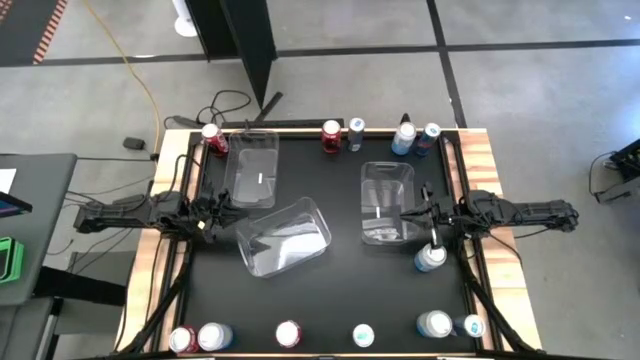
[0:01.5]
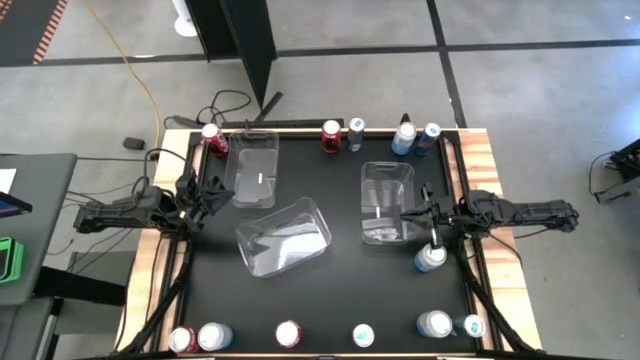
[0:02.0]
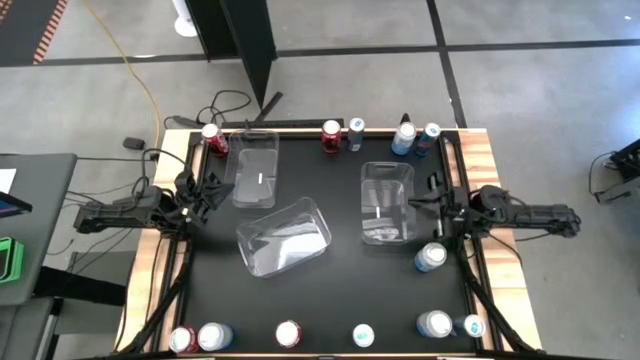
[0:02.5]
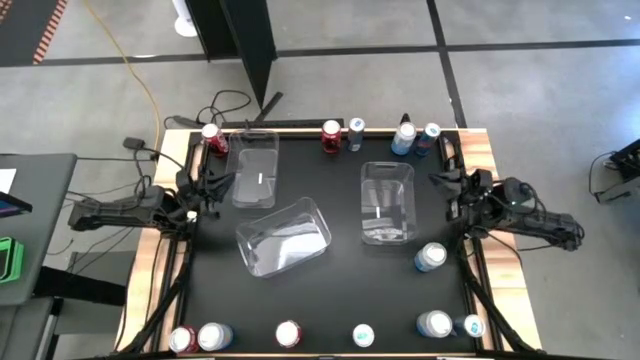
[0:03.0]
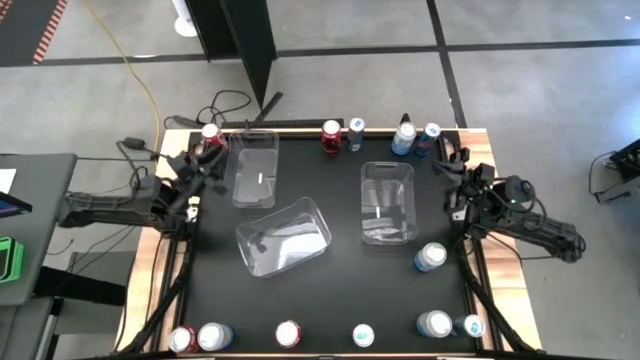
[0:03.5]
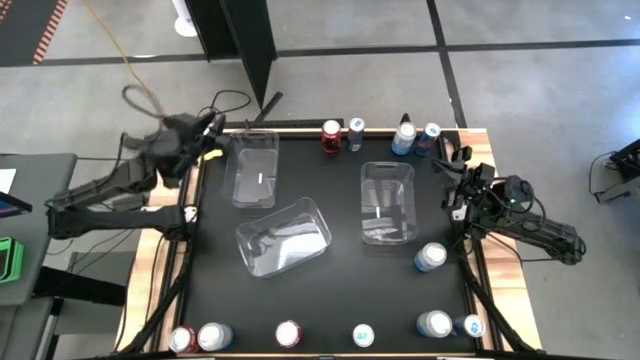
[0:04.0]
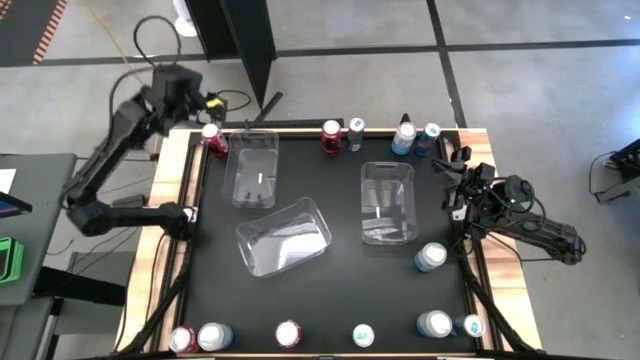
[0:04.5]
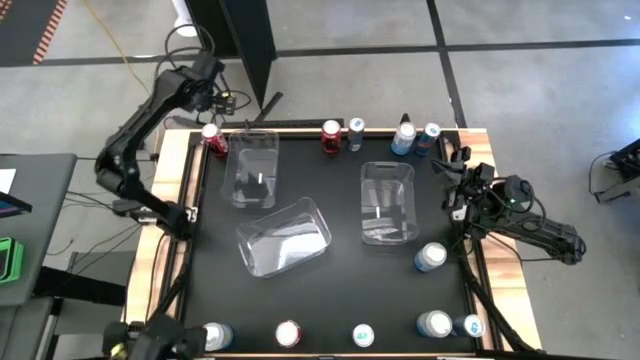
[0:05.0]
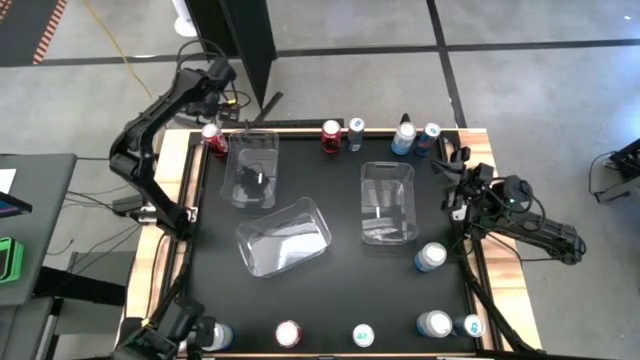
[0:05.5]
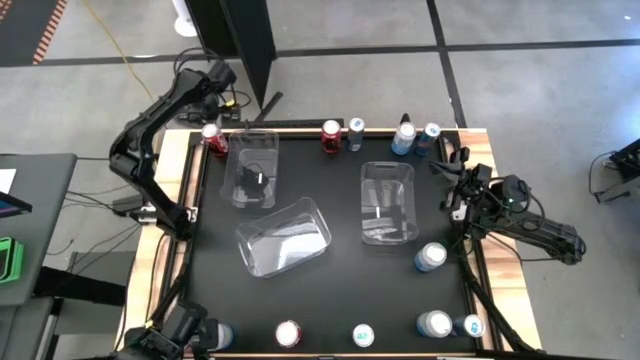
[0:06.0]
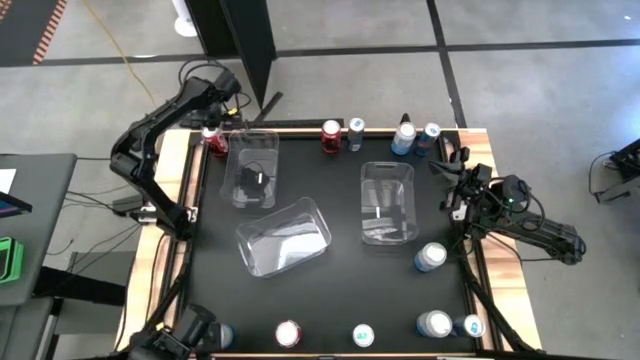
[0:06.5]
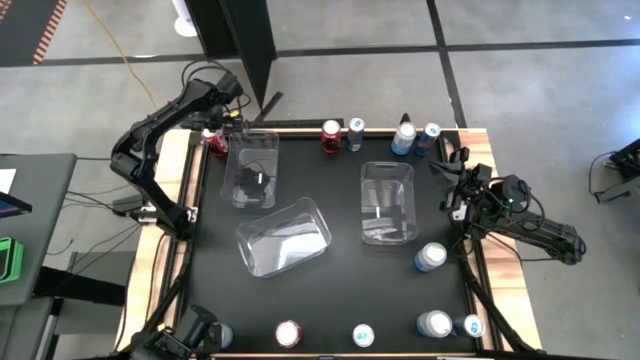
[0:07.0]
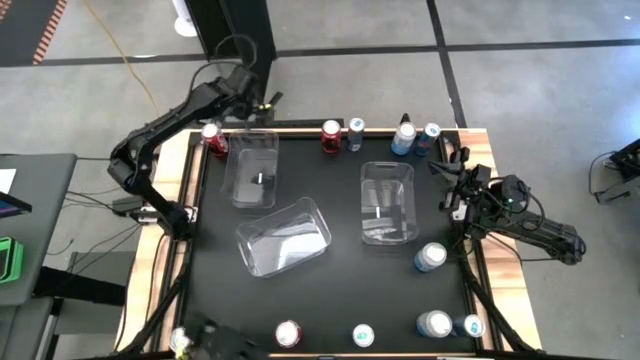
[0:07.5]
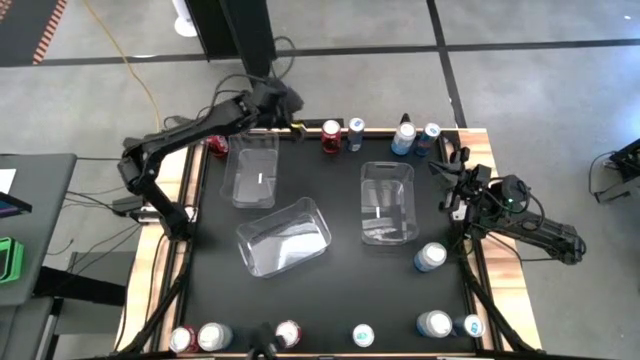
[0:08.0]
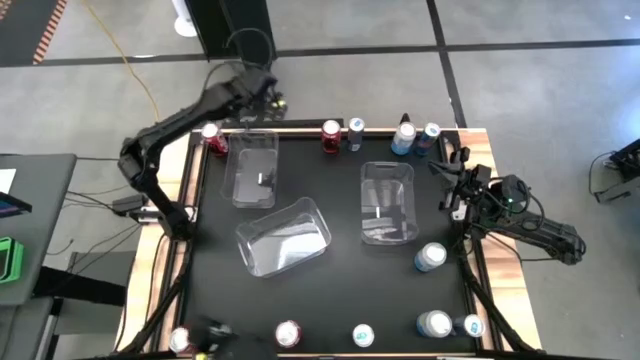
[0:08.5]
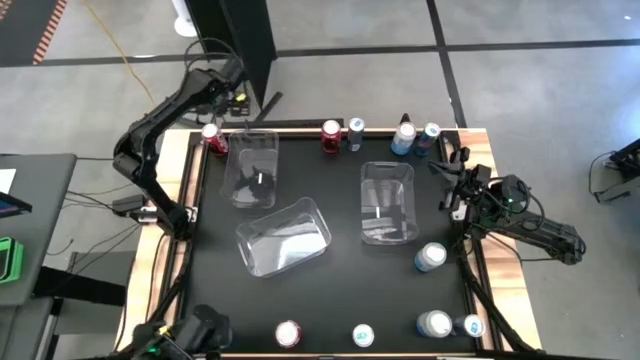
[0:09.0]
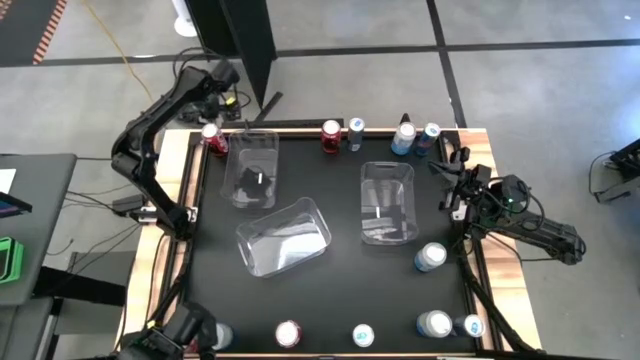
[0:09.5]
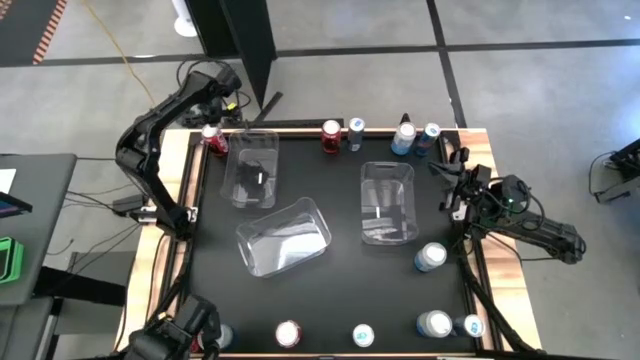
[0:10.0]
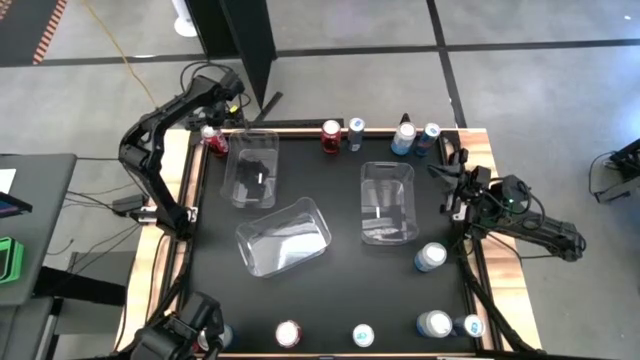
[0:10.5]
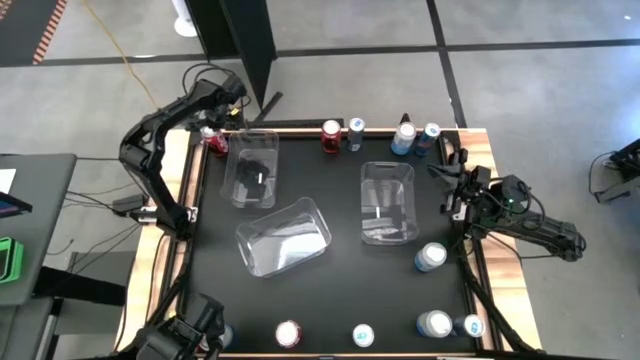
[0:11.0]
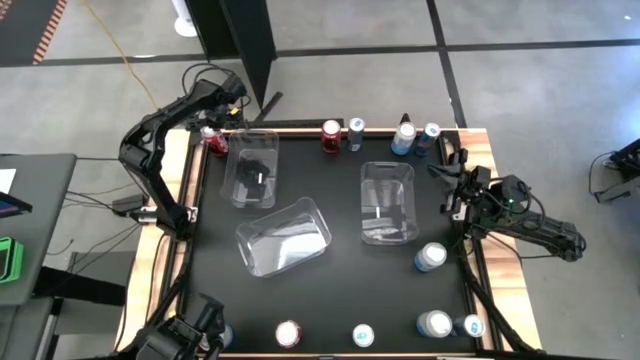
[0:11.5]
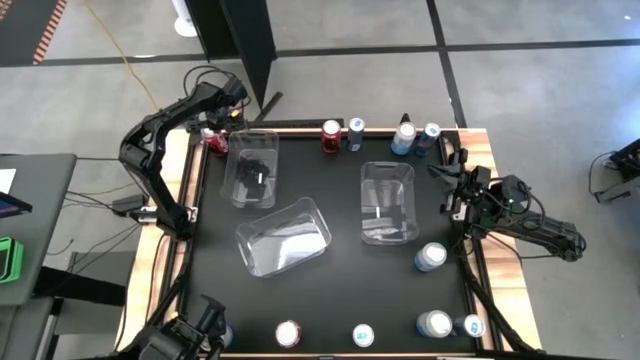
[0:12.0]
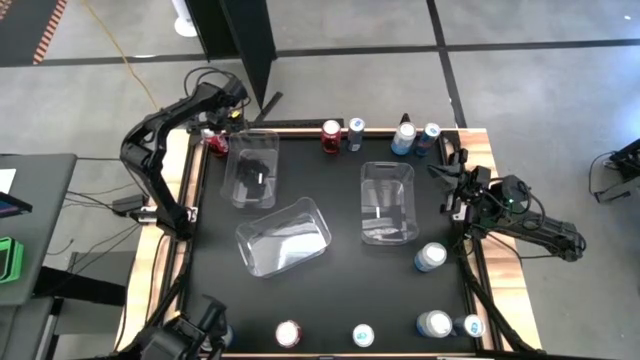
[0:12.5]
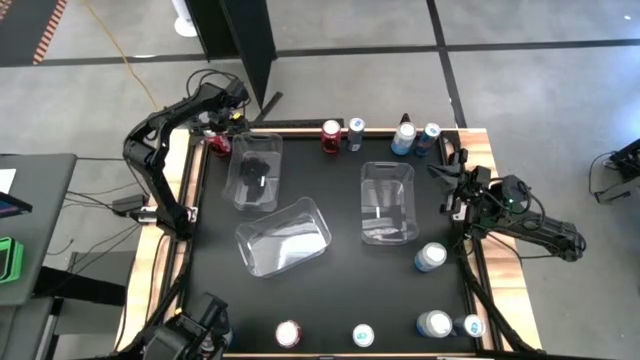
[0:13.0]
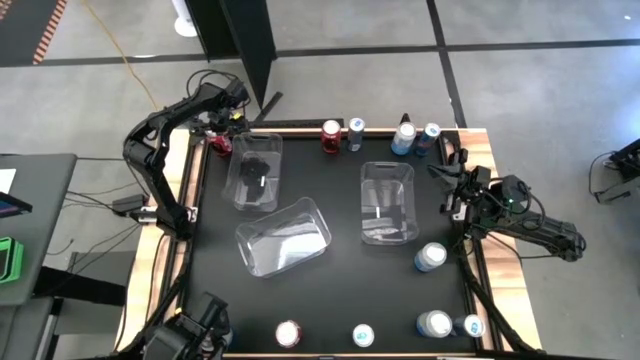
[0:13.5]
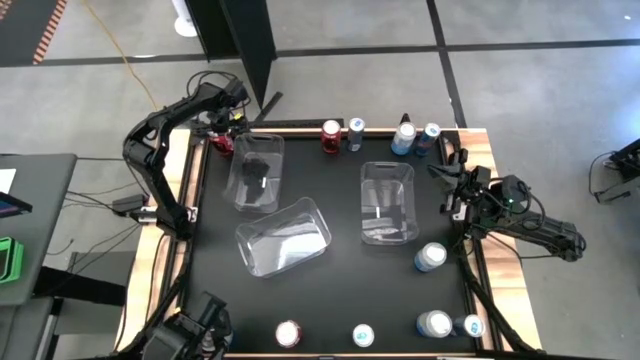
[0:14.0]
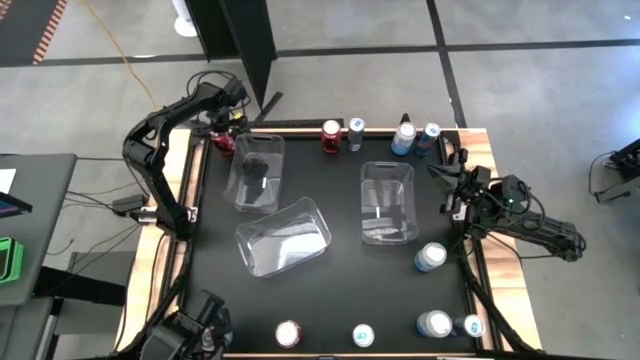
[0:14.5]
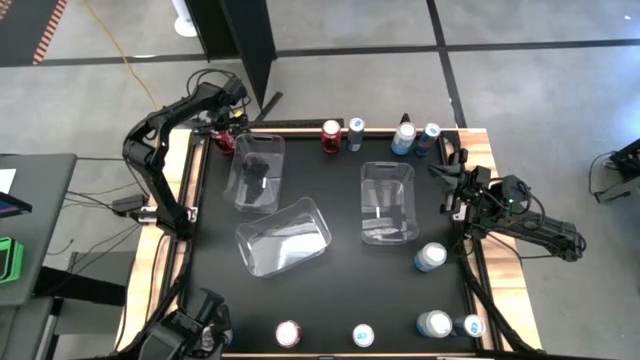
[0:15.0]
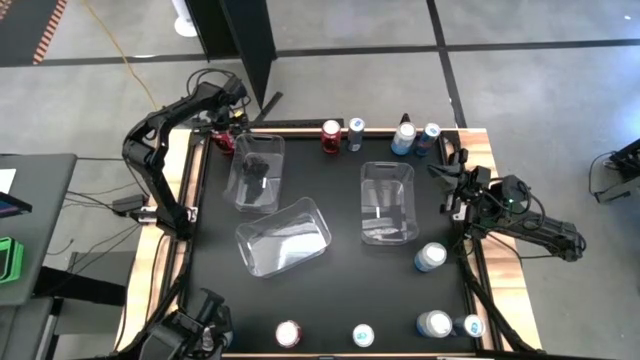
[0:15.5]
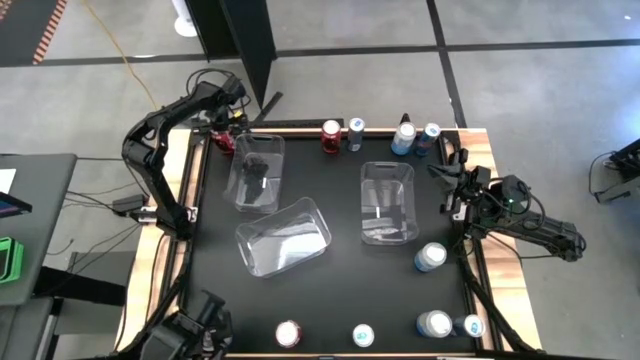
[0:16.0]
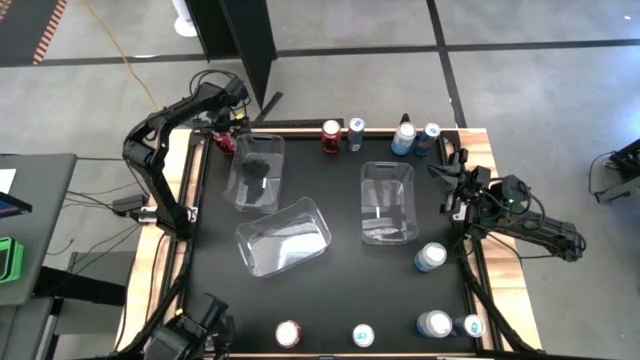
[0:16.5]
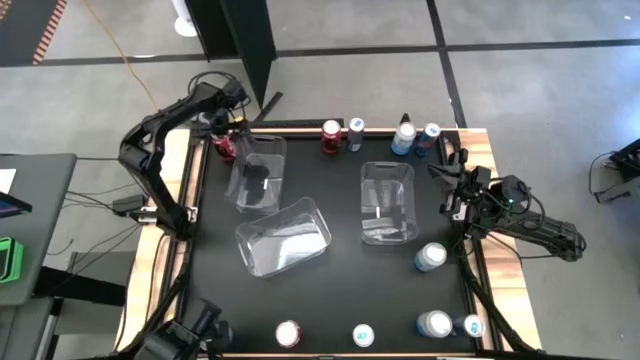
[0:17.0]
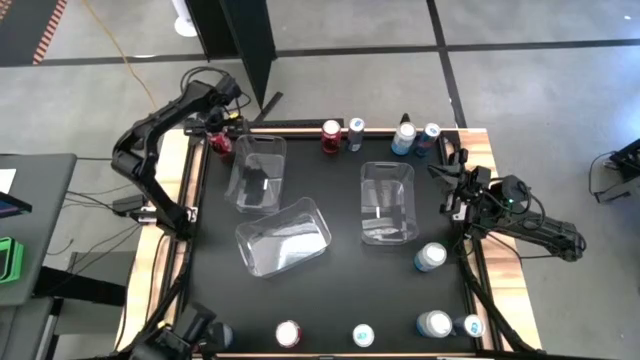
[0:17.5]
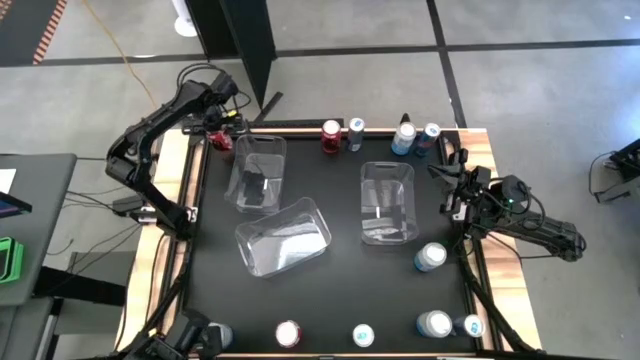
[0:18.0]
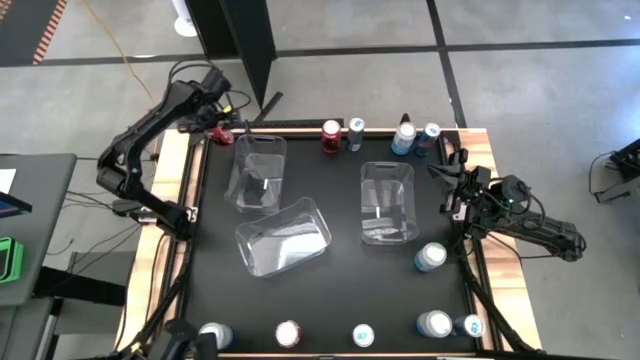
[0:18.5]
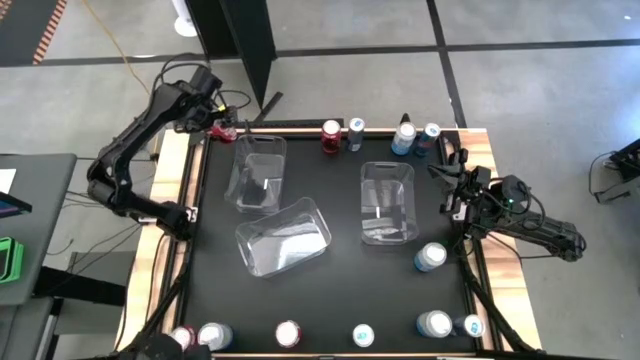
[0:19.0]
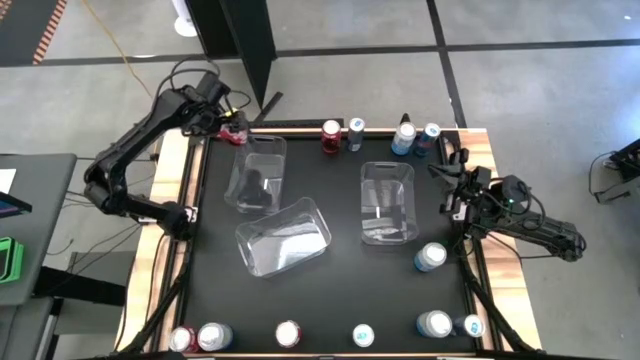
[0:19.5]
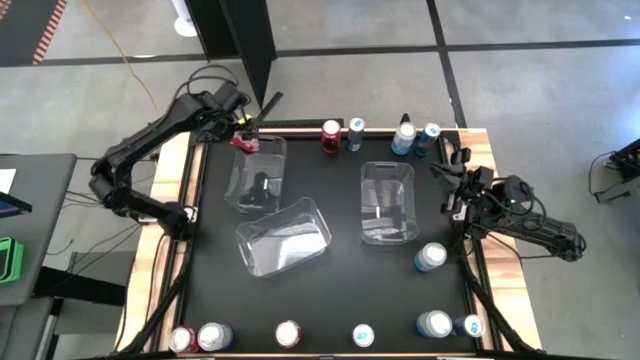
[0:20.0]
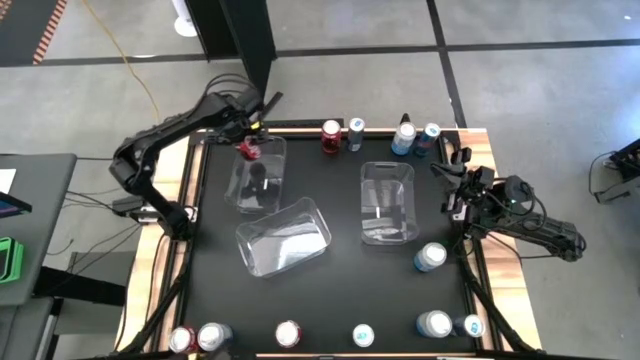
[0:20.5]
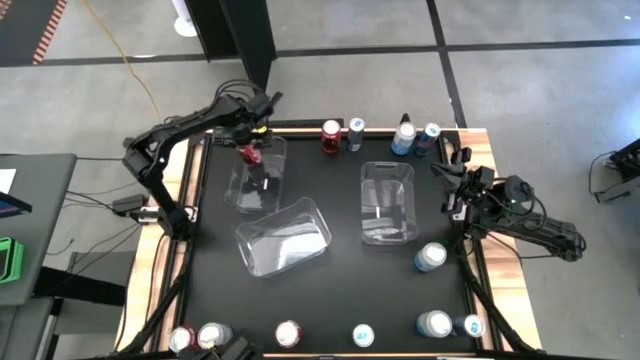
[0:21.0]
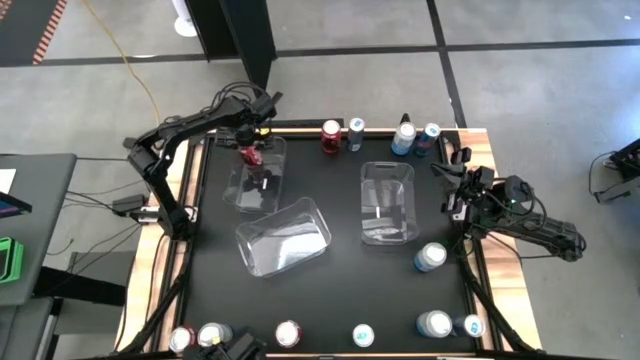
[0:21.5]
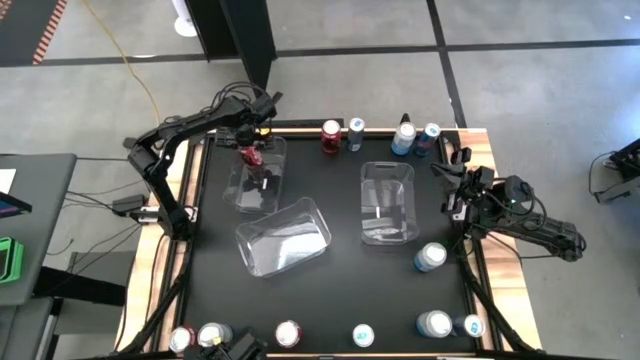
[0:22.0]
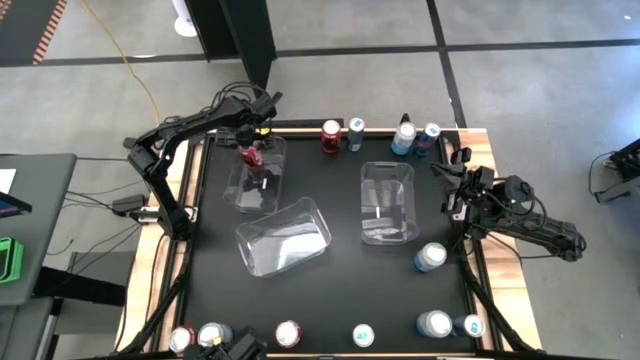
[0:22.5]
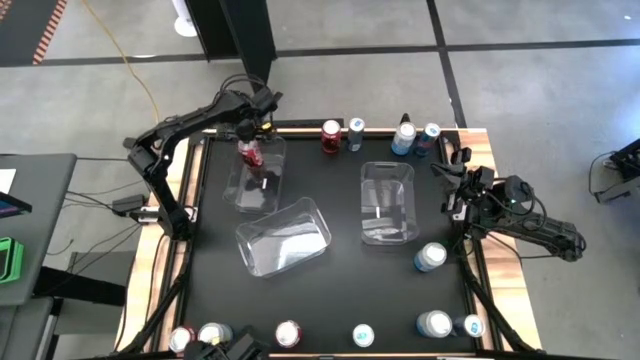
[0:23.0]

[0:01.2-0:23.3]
Task: Sort soda cans
Put the top left red soda can into the left transparent bin
